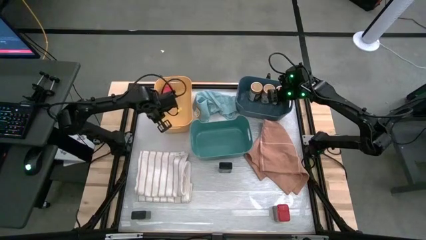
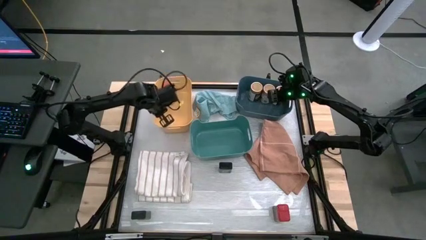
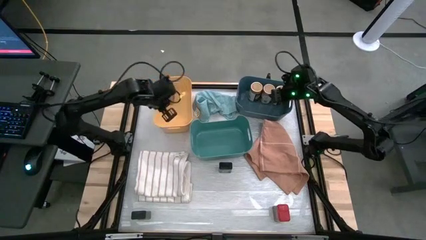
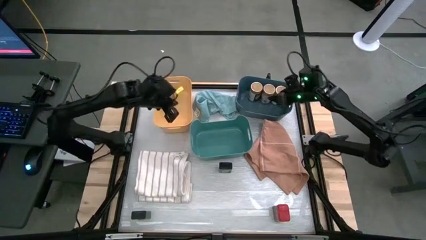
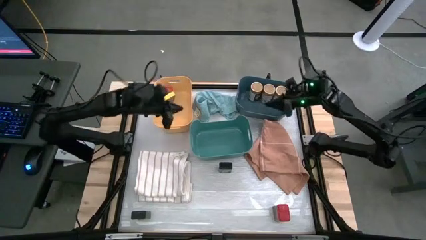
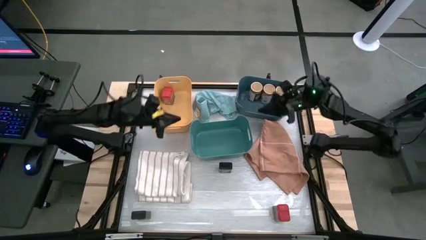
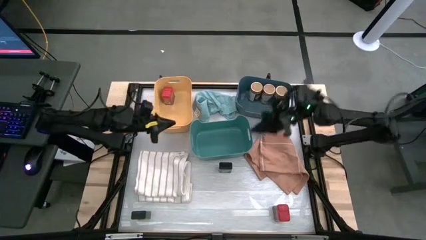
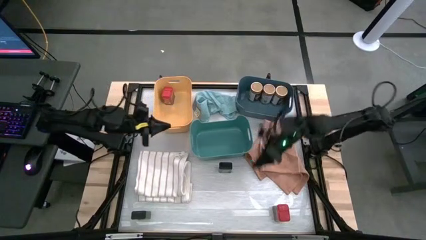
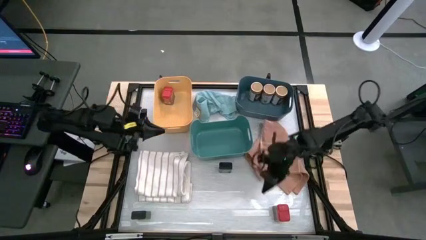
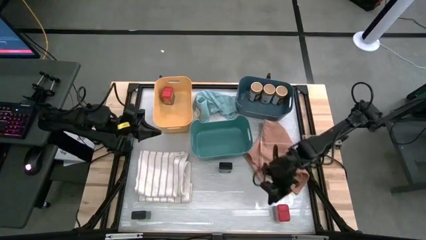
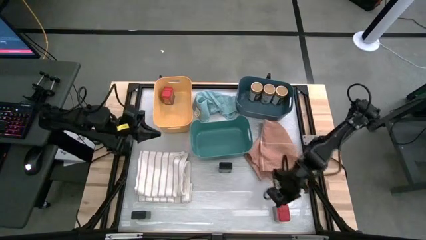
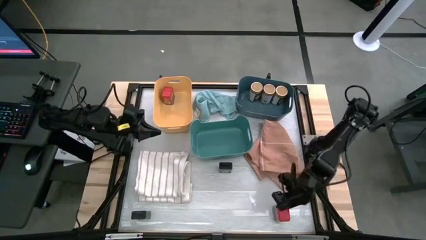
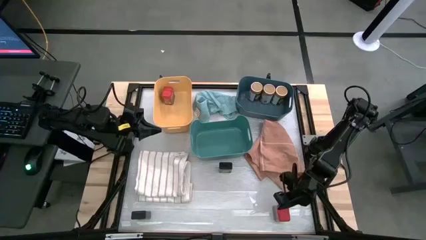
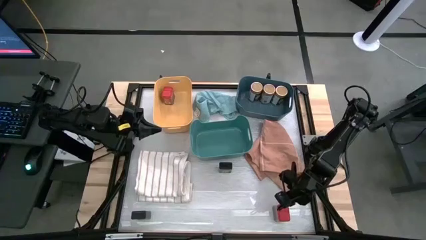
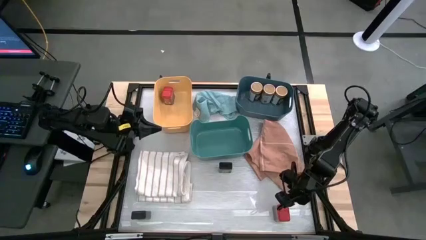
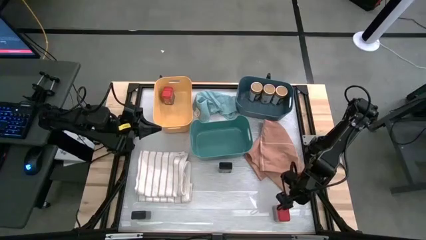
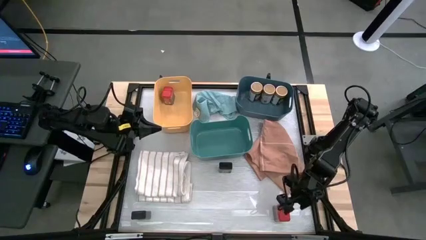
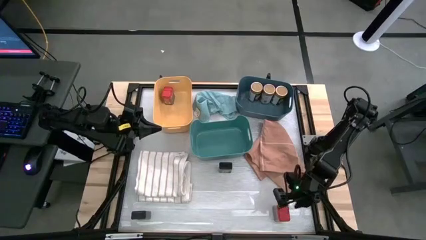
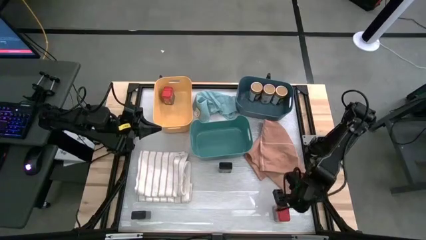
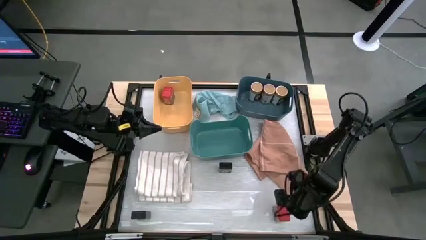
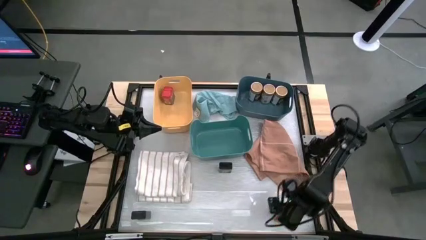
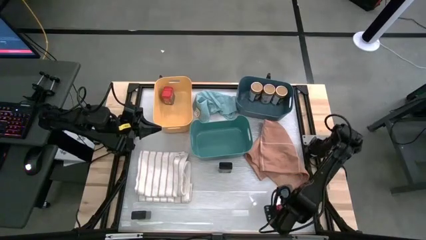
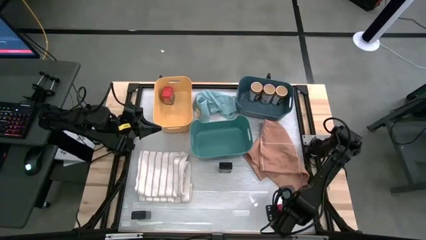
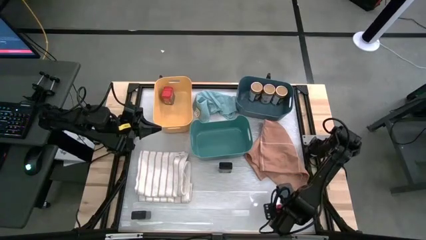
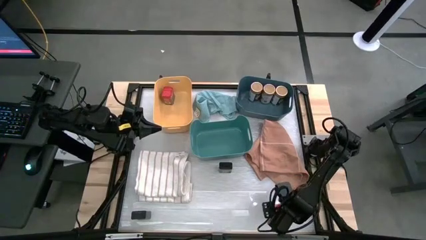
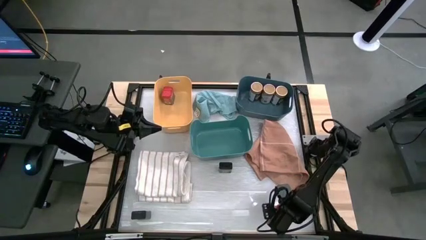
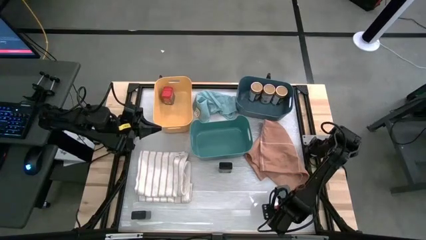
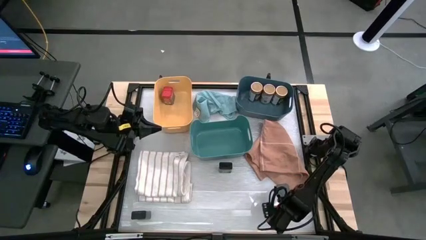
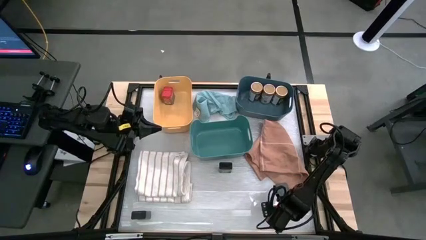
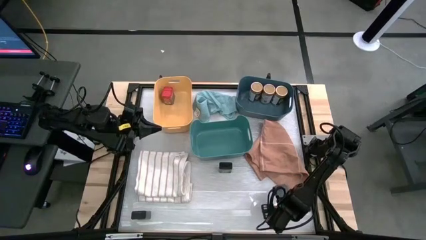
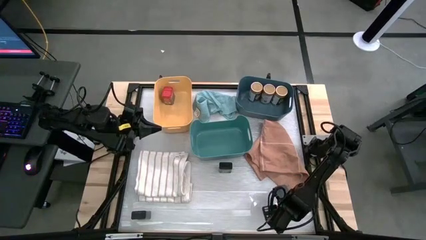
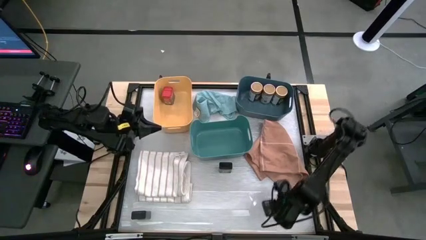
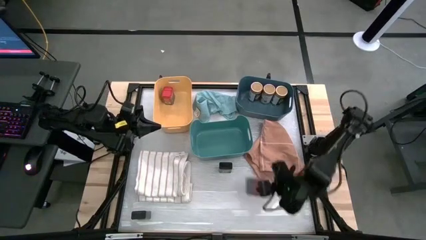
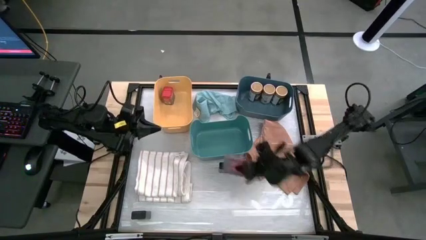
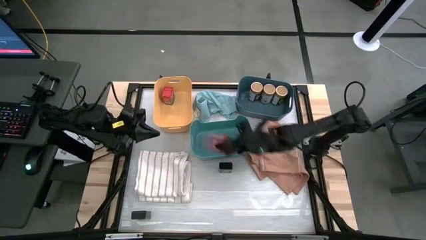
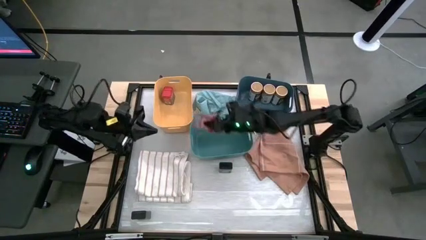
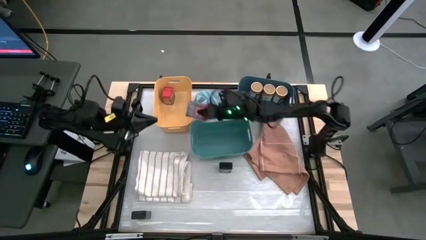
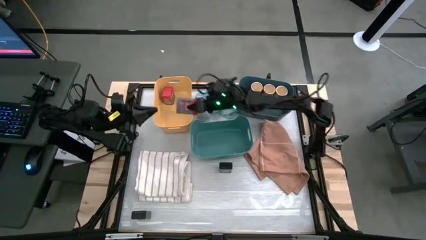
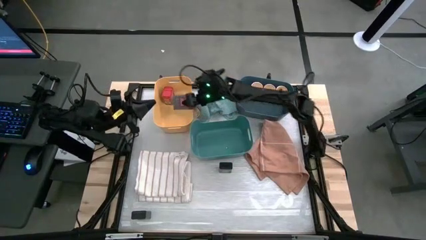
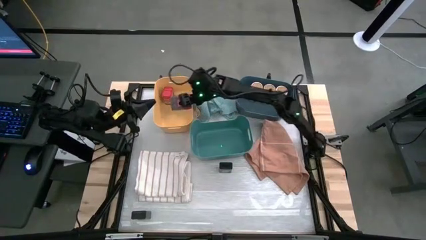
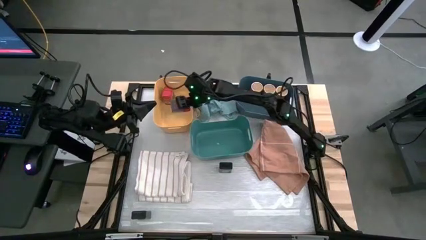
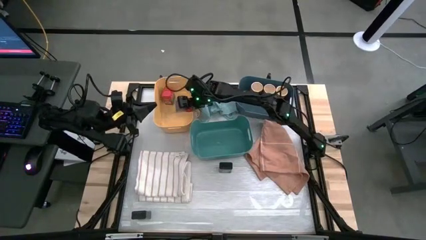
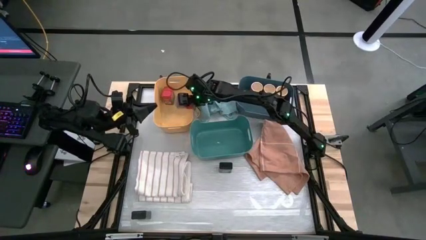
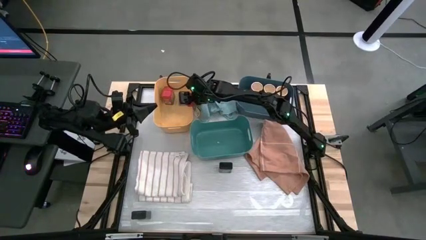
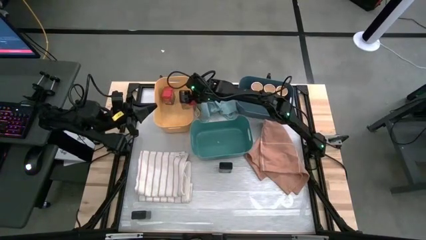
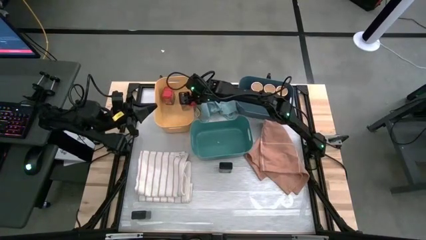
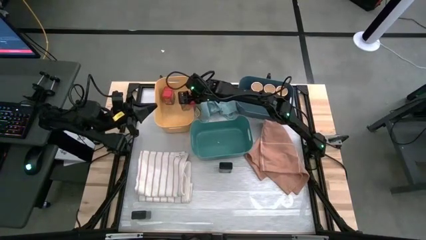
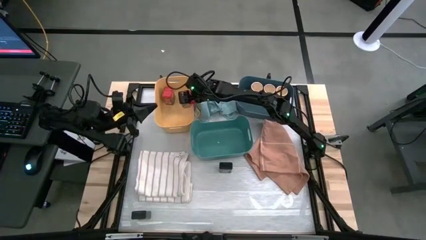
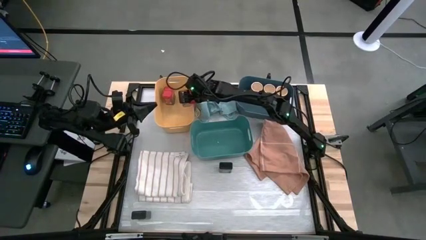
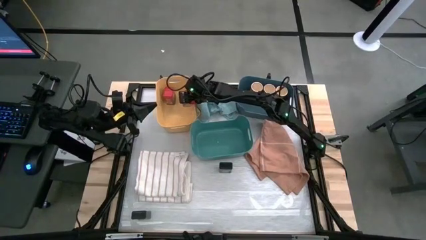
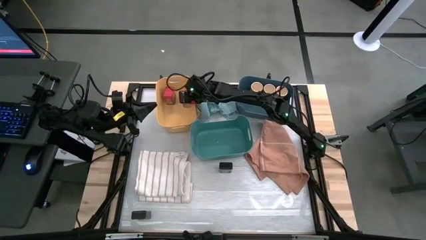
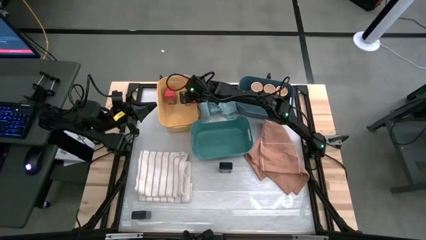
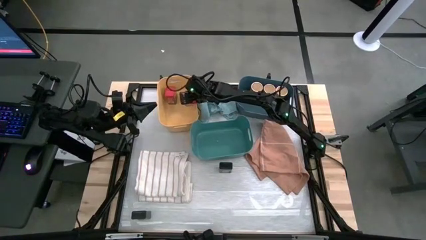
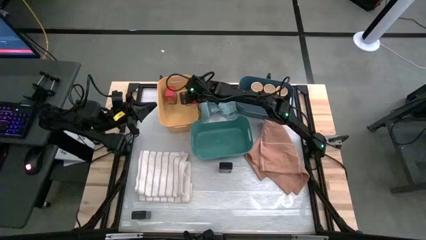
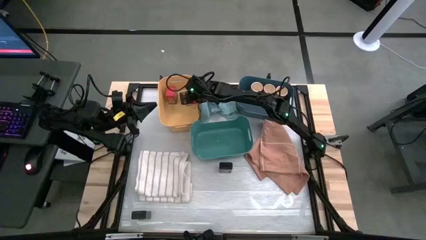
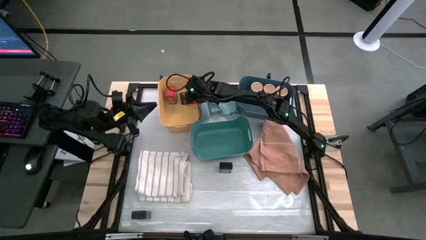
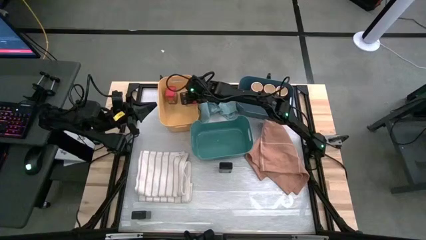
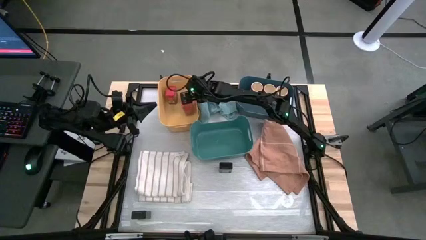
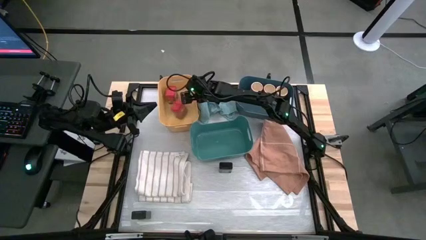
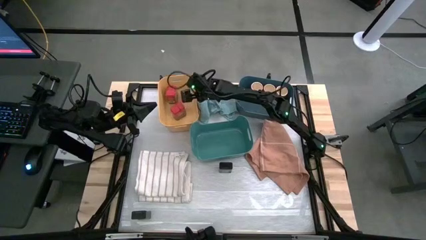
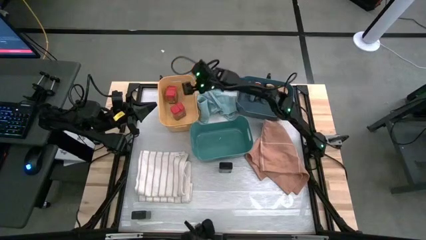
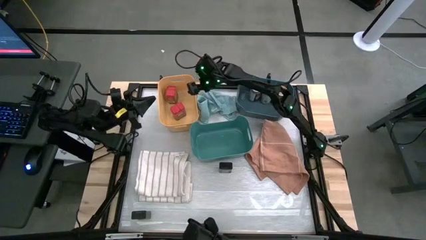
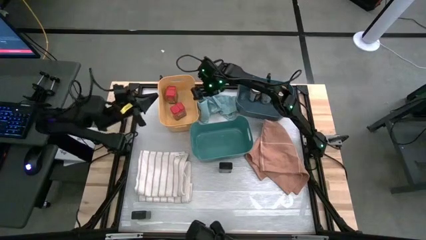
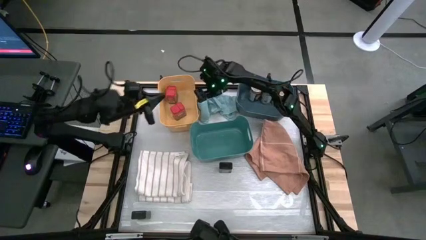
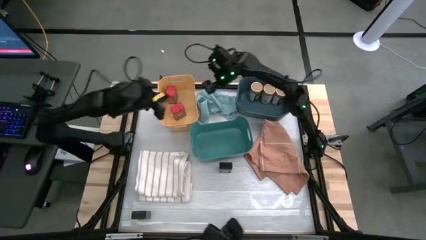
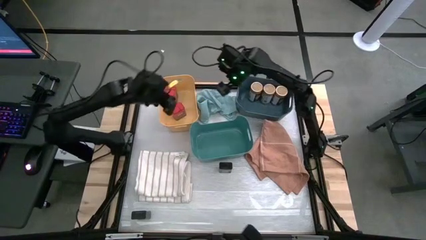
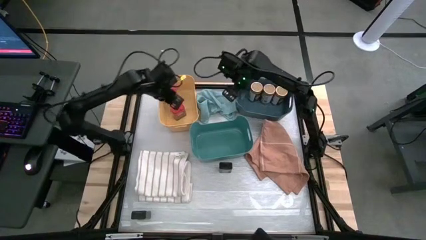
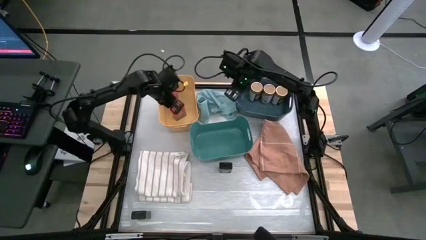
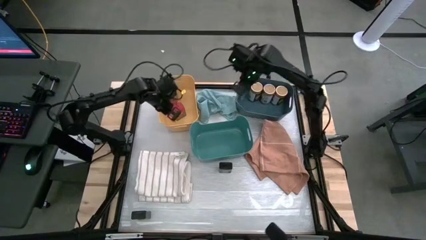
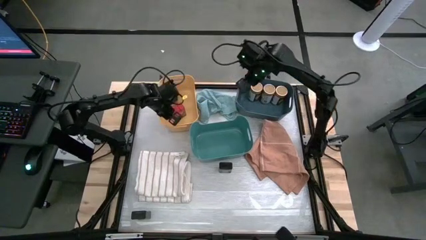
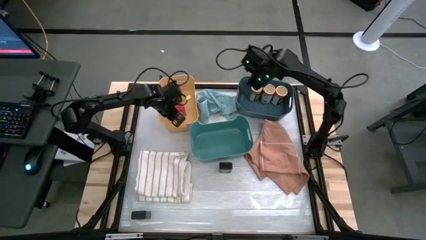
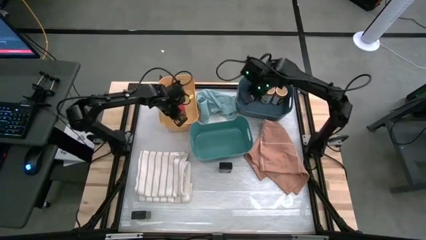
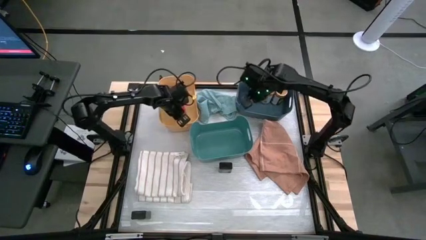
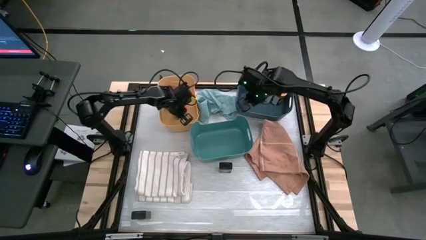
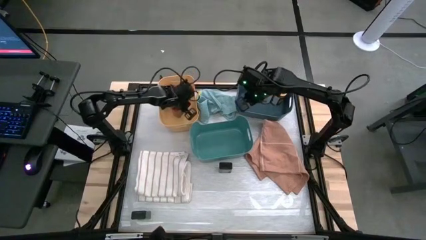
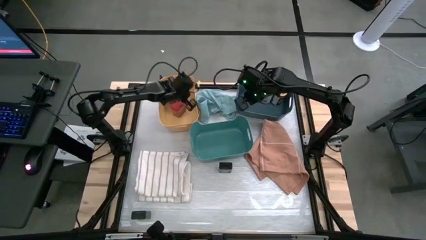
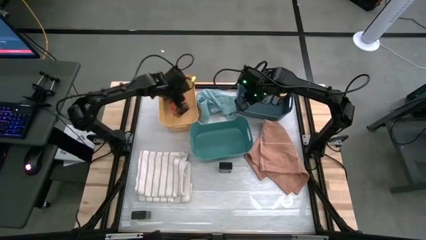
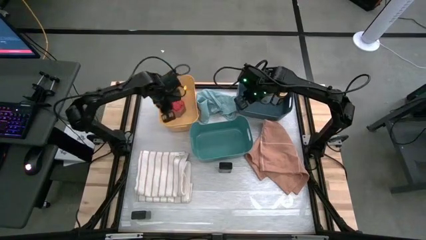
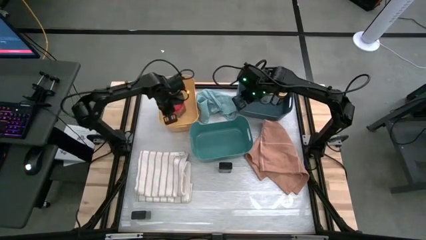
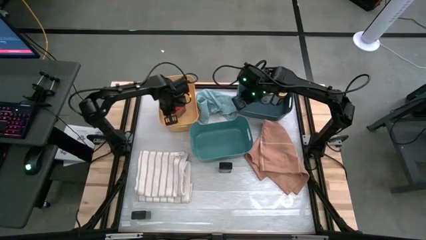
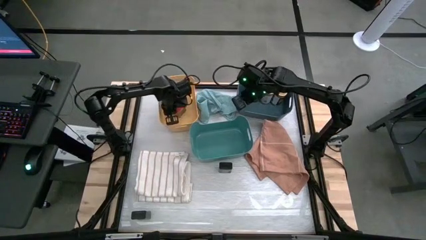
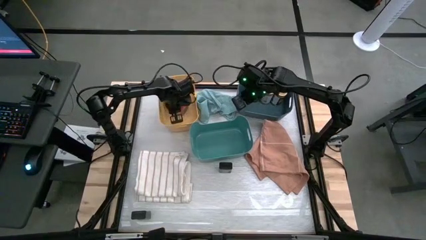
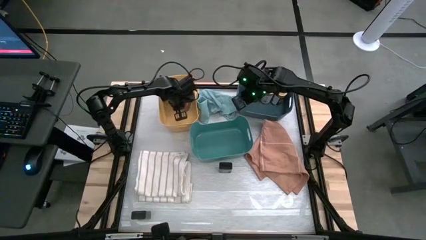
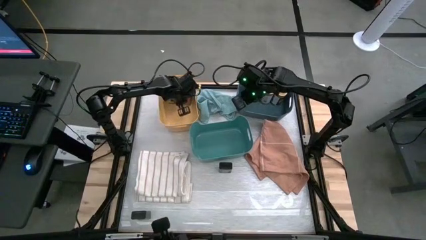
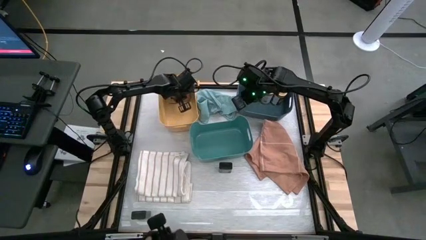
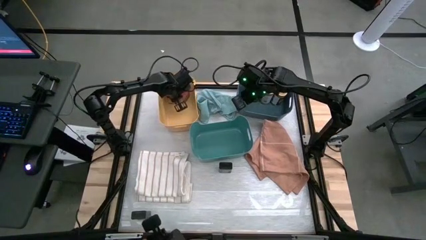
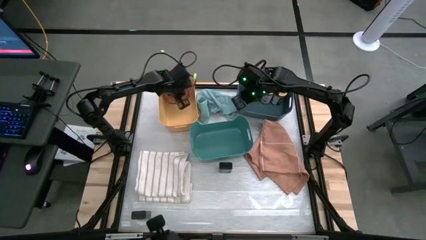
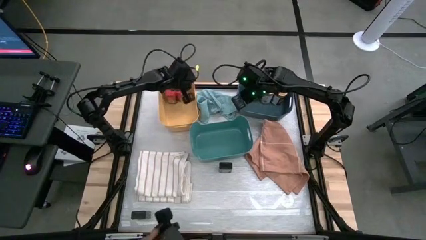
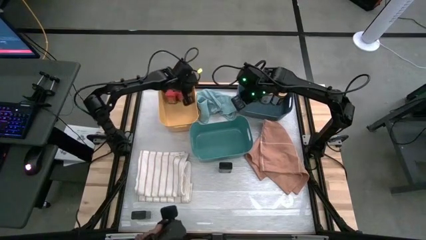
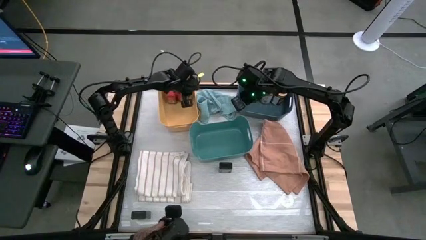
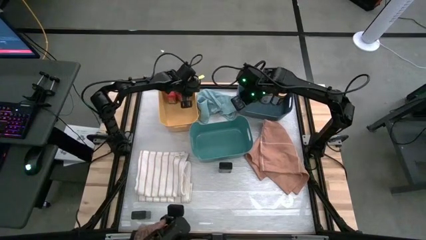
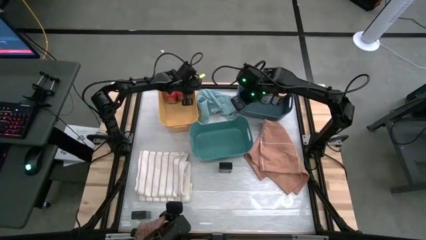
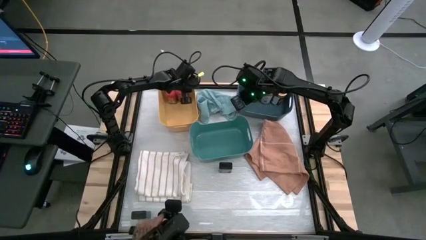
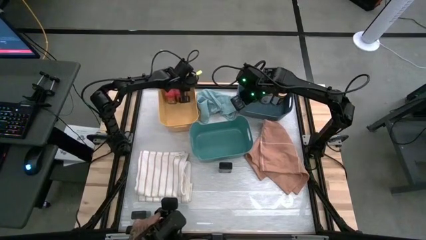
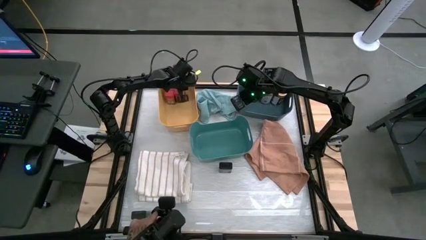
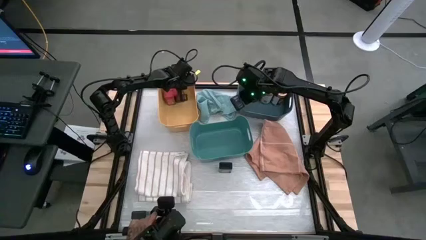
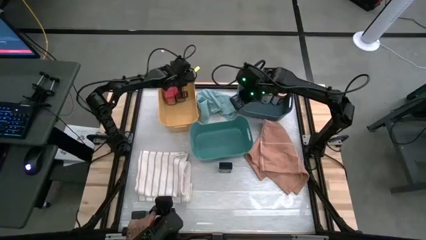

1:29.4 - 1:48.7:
Task: Sort spices by type
Put the red seasoning can into the yellow bin
